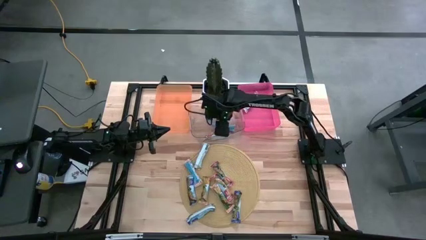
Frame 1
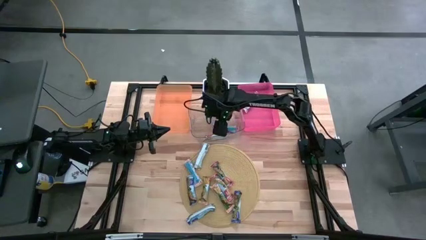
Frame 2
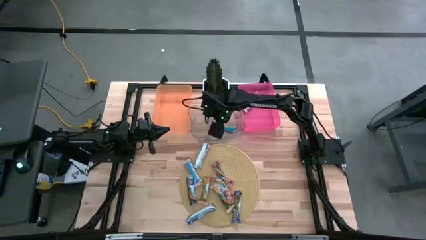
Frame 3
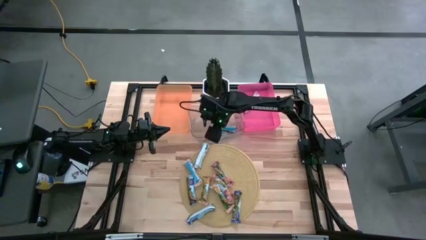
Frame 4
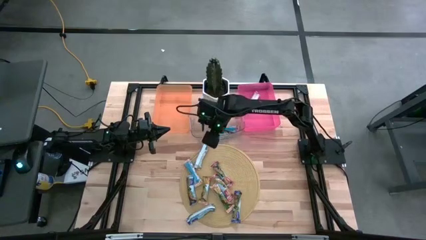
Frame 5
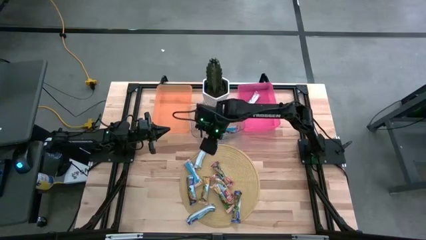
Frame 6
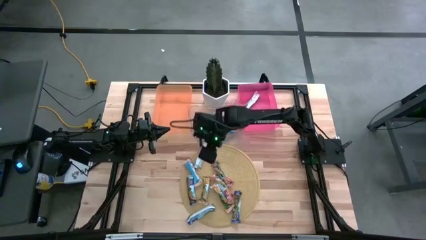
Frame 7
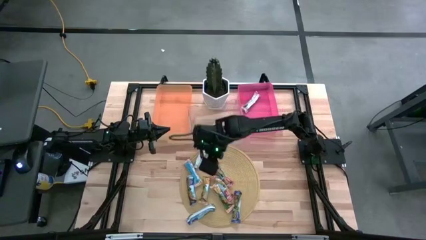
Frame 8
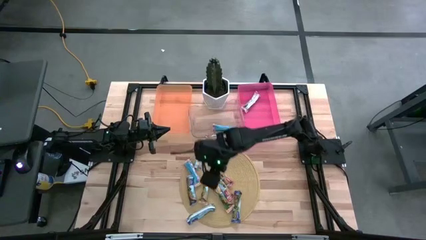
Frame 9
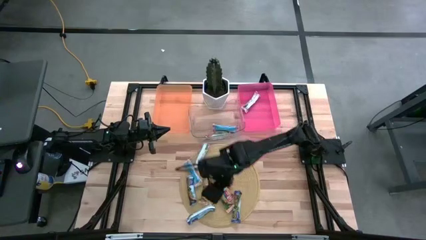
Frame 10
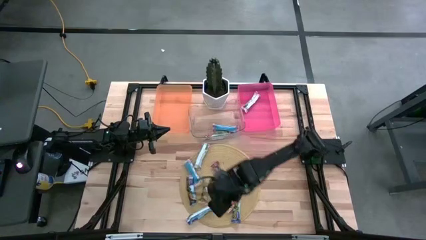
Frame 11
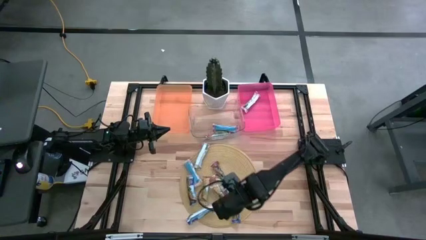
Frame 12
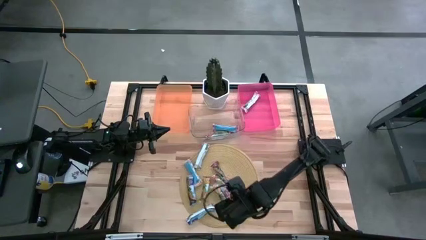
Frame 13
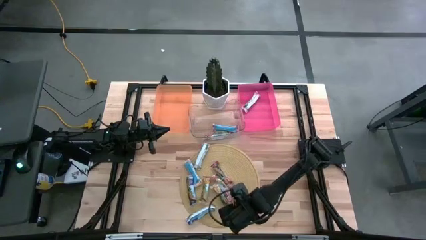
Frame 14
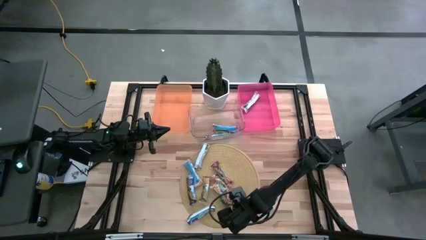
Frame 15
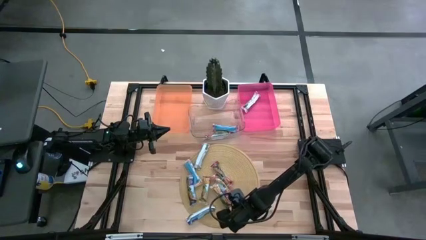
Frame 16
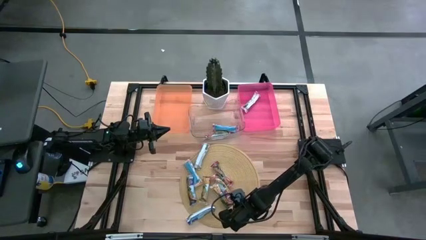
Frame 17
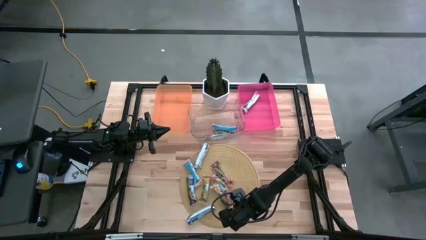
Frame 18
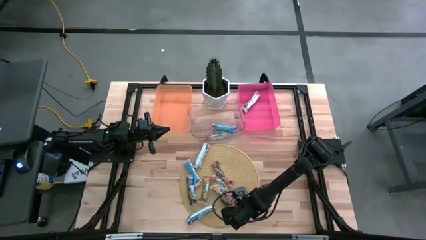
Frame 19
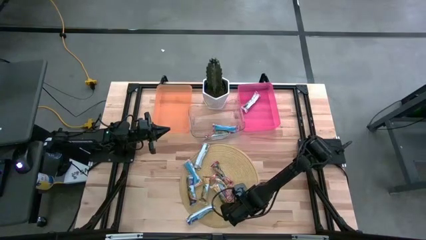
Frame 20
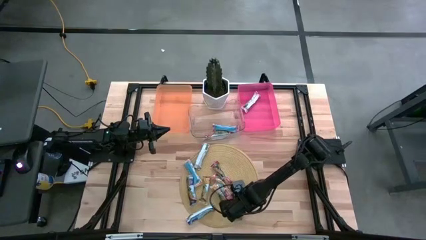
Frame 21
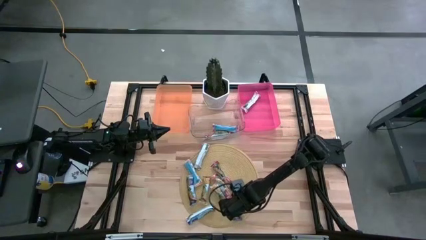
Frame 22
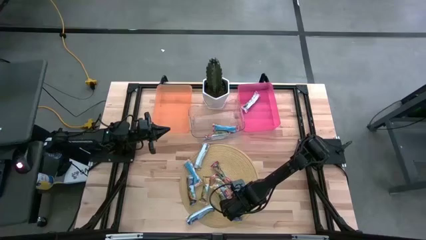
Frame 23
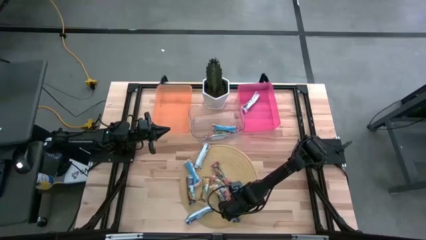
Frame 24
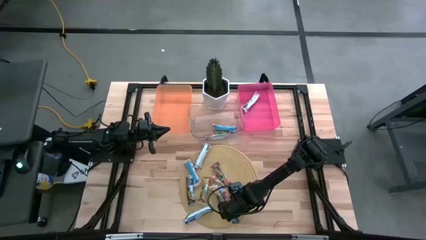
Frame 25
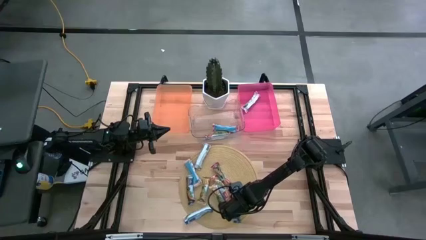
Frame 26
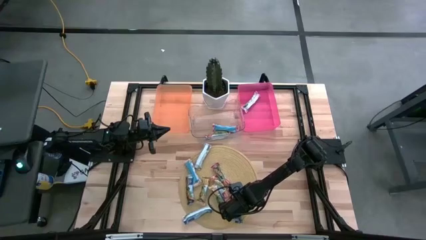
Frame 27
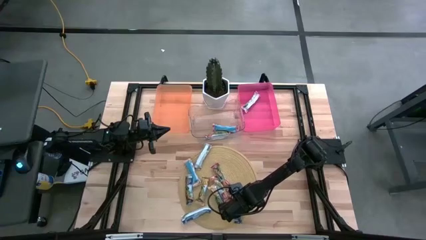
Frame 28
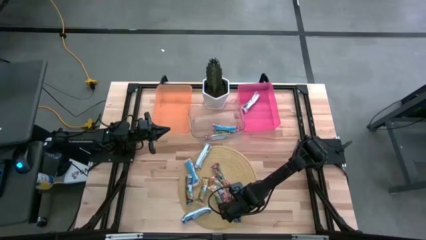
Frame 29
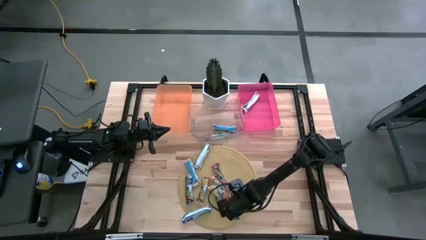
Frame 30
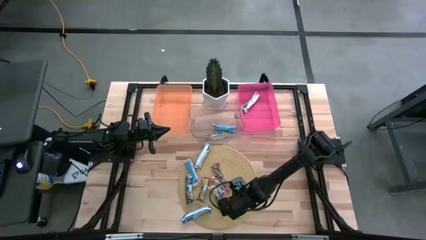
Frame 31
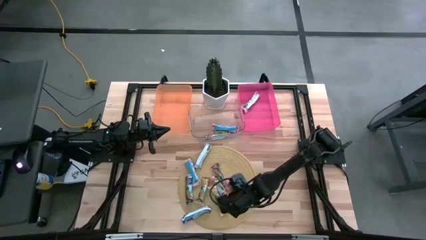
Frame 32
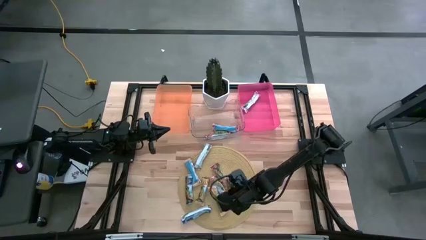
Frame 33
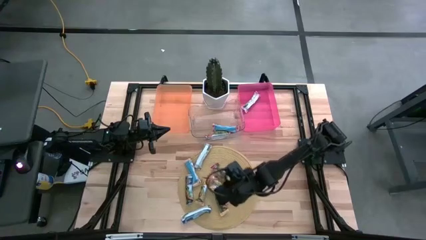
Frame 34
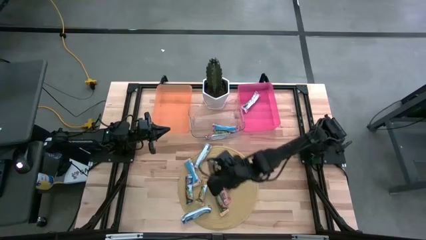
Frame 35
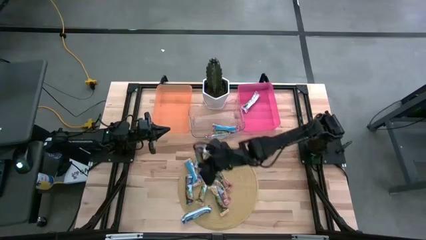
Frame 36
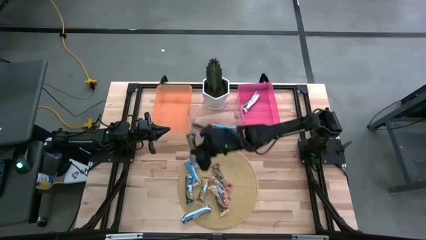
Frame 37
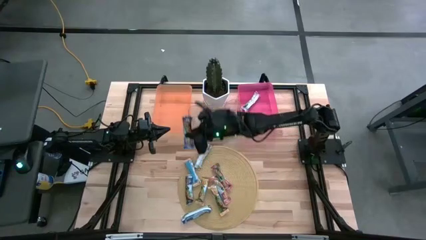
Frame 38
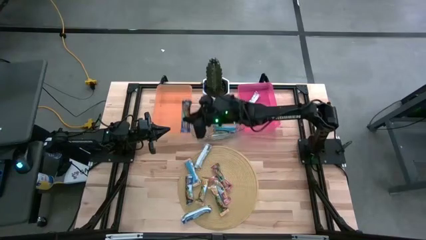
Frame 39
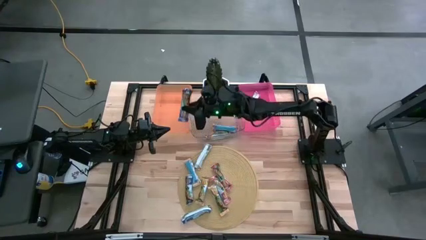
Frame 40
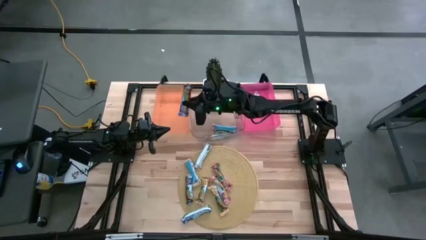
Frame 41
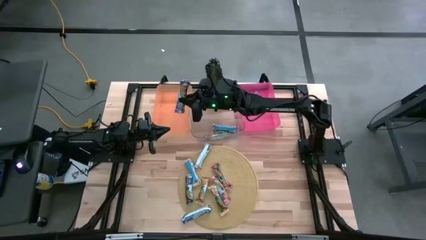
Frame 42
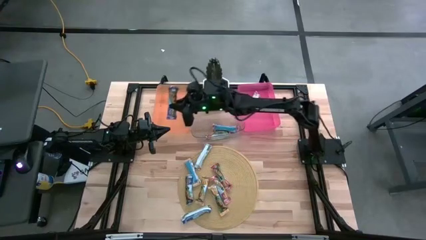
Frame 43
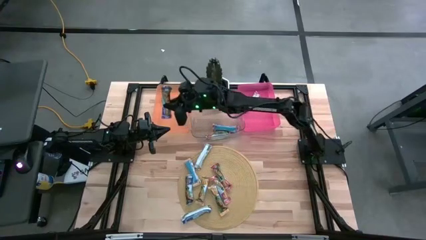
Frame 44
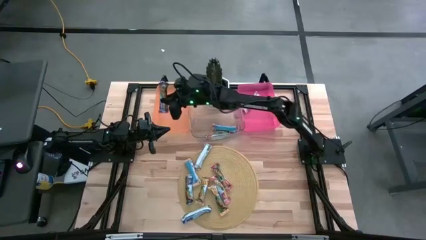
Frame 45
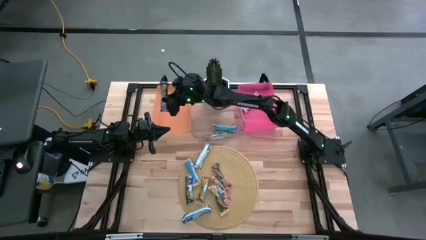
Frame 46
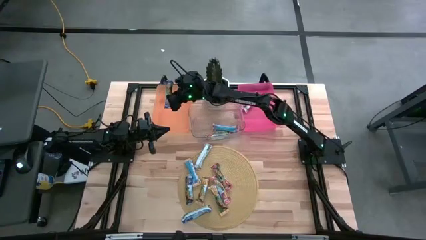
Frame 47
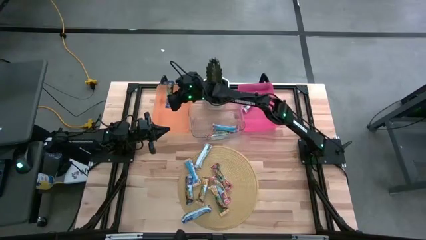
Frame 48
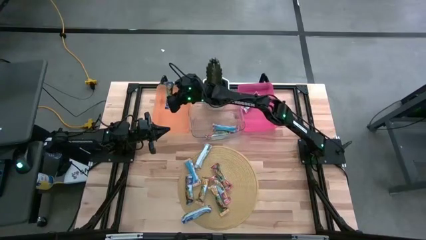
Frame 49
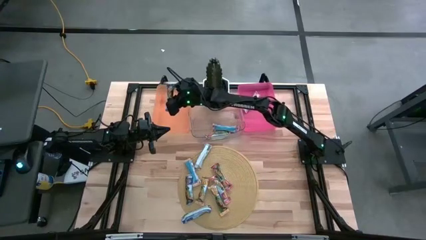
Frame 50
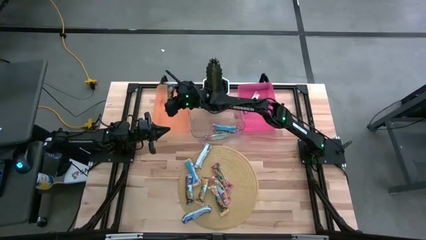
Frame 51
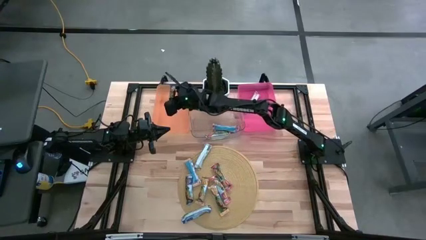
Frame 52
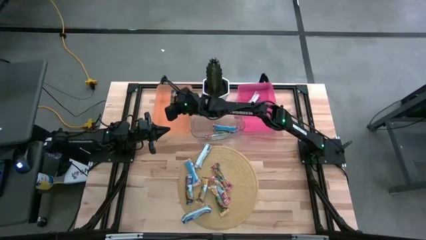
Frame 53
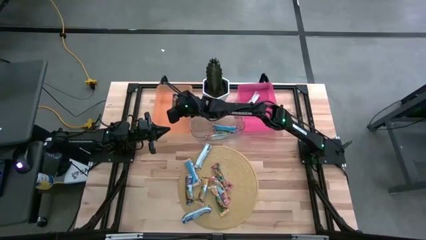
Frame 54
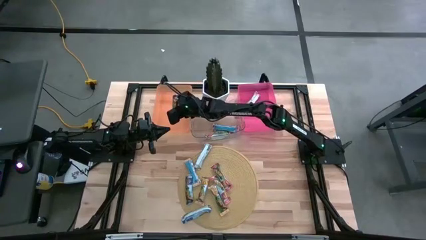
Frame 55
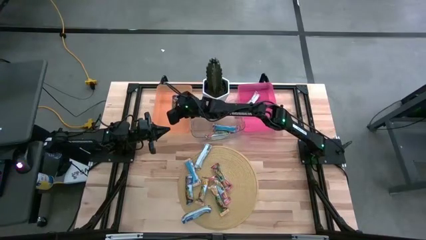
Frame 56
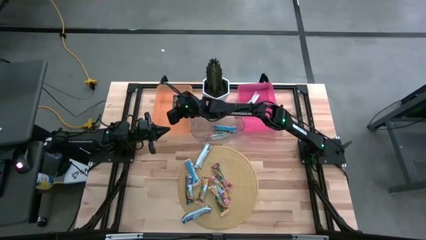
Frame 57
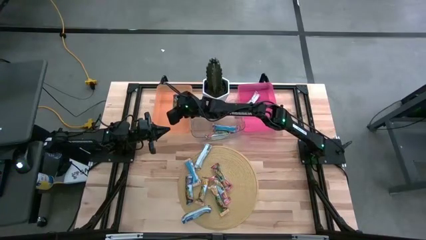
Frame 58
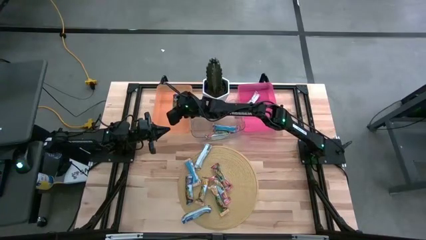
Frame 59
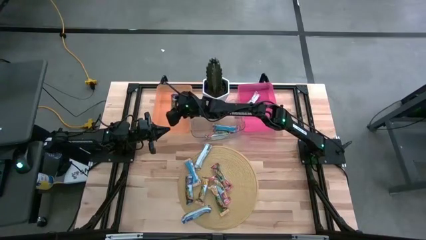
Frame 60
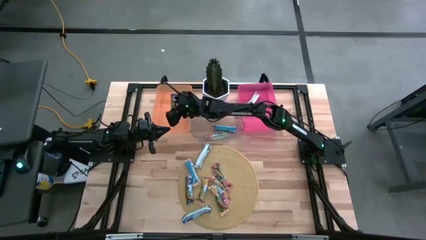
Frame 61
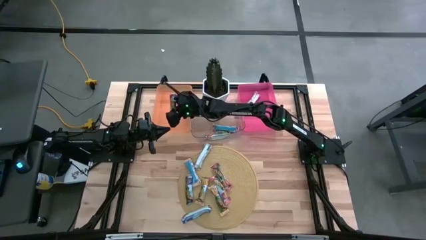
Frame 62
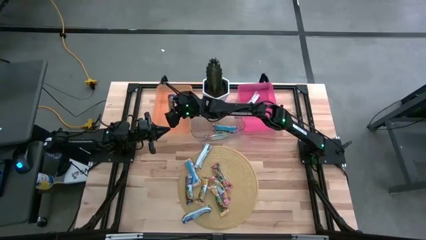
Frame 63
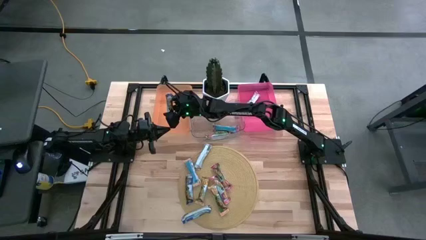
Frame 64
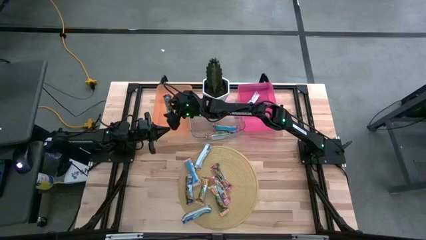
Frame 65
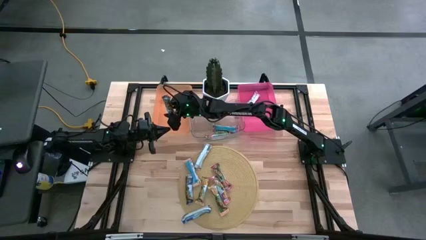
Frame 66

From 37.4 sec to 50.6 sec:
Task: Pick and place Granola Bars by type
Put the blue granola bar into the orange bin
